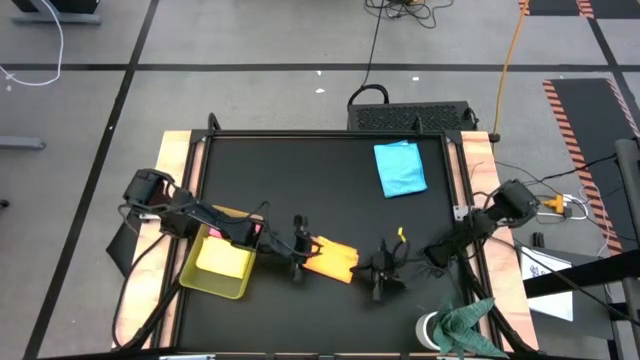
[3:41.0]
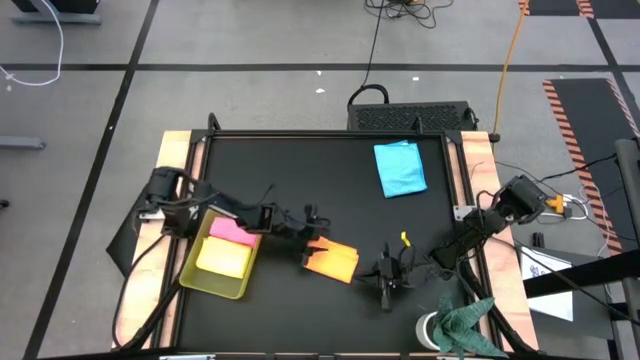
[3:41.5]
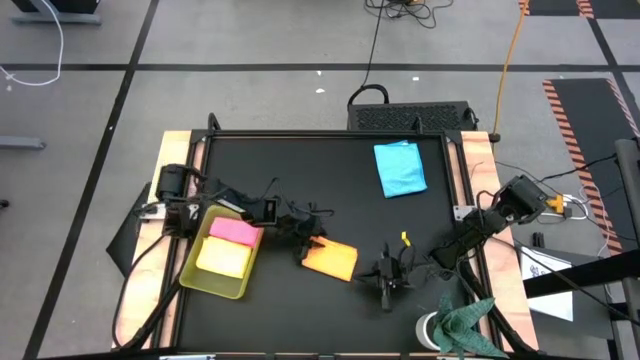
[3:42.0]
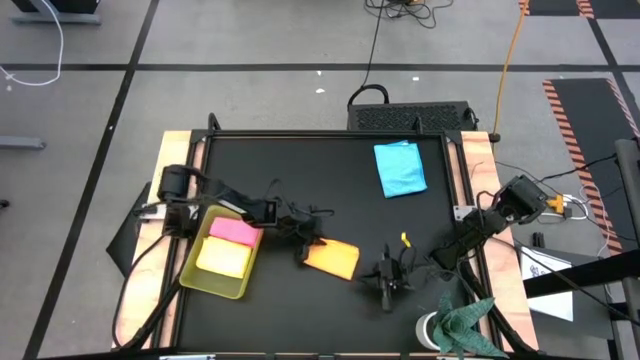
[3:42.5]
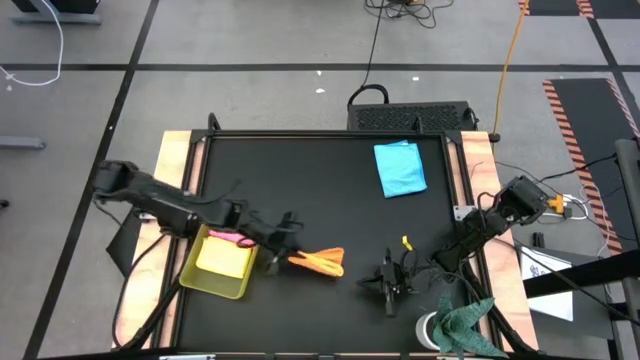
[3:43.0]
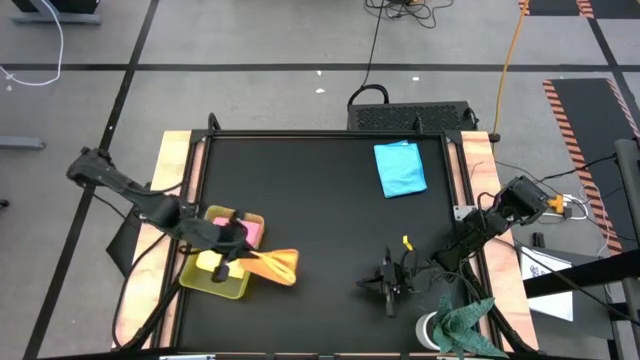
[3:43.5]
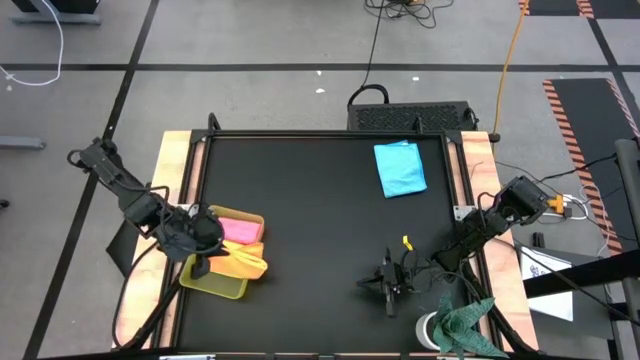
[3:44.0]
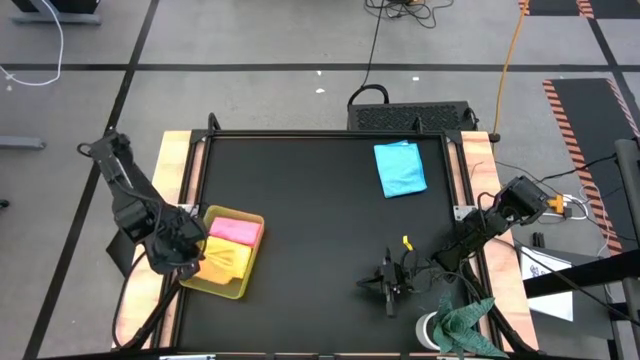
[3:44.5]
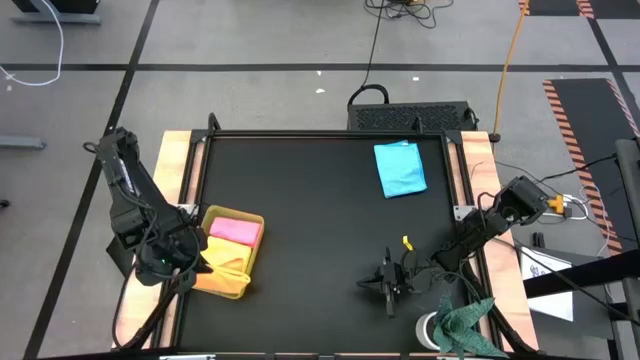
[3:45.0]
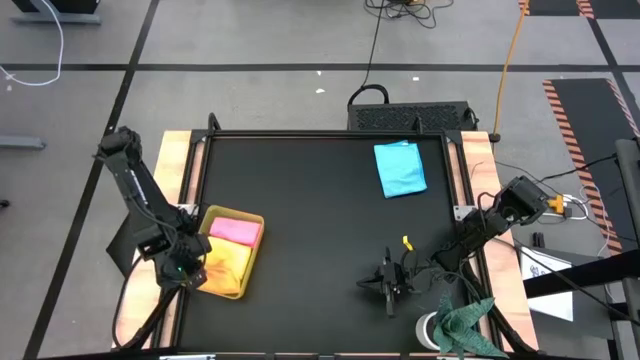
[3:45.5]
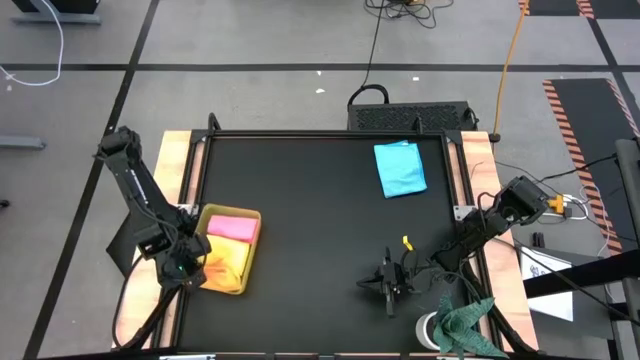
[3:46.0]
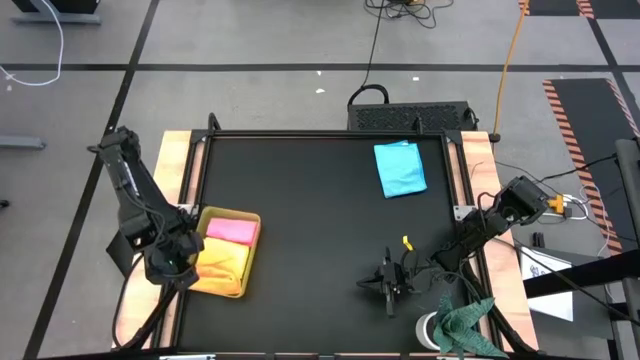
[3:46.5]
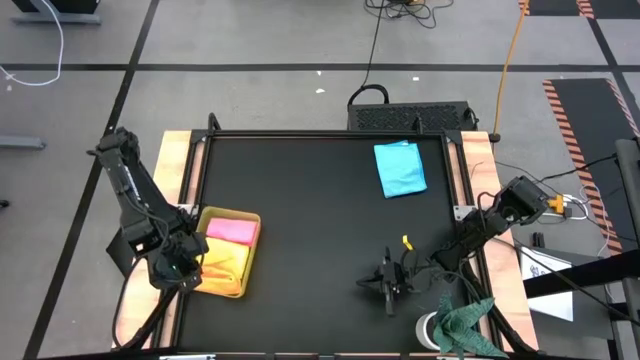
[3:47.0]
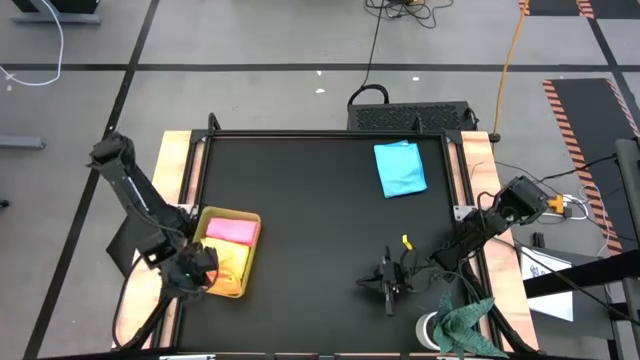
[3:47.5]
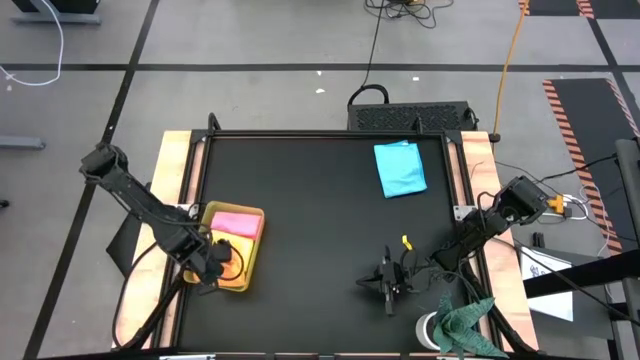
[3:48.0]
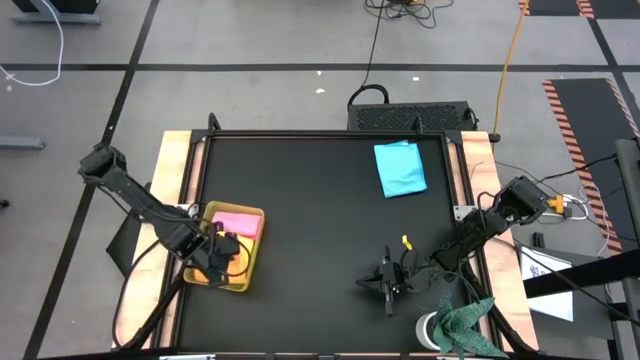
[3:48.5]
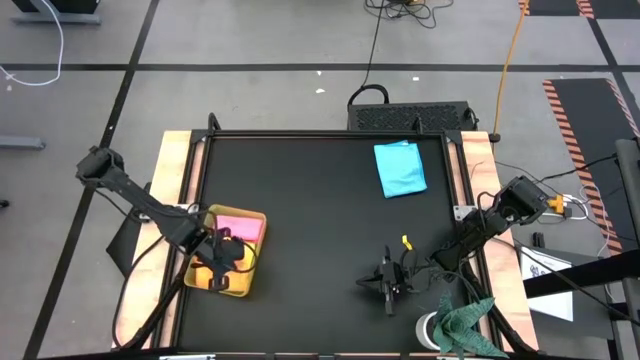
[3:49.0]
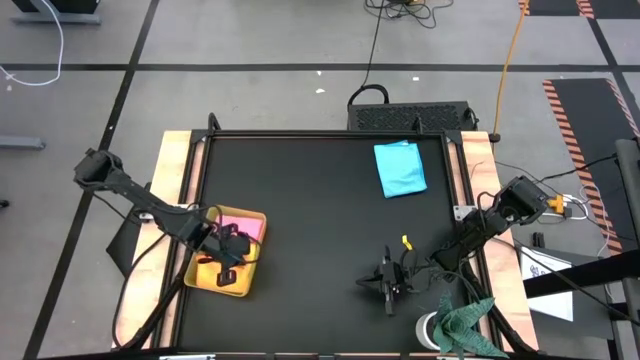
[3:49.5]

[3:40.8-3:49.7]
Task: Fold microfiber towels
Put the orange microfiber towel into the yellow bin

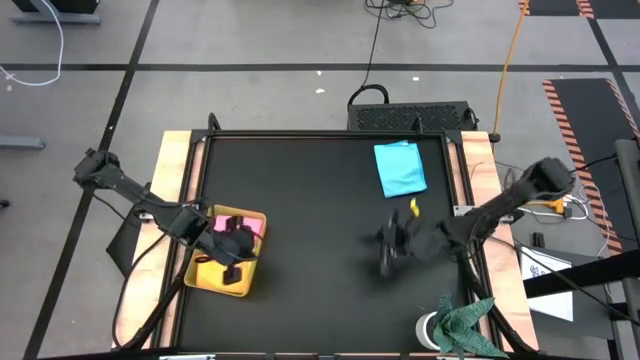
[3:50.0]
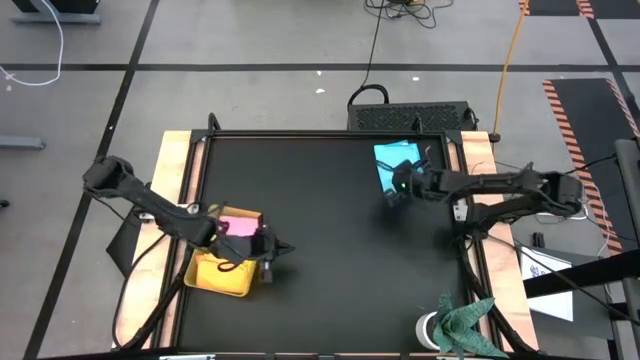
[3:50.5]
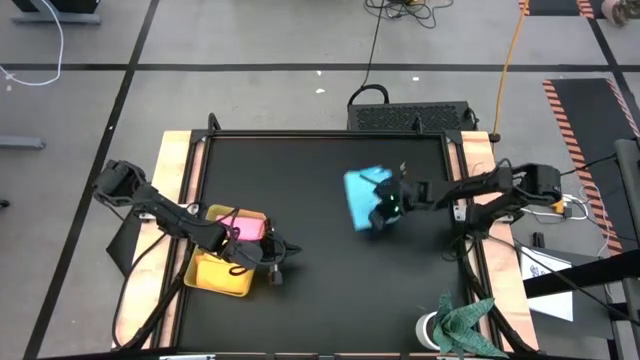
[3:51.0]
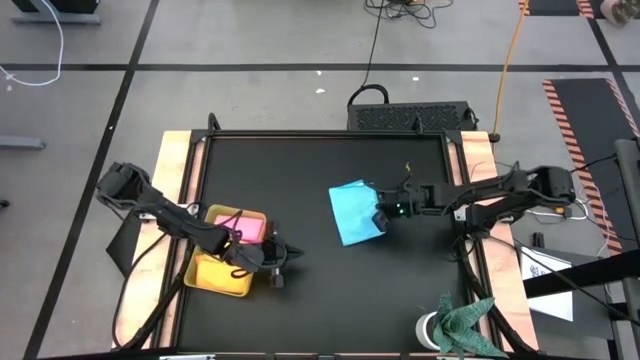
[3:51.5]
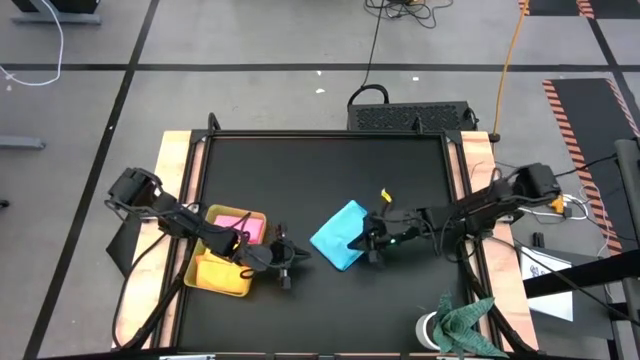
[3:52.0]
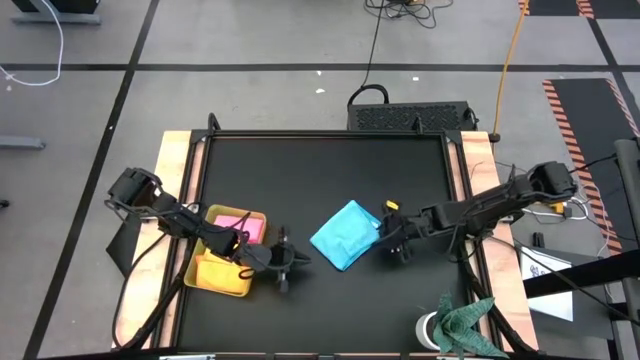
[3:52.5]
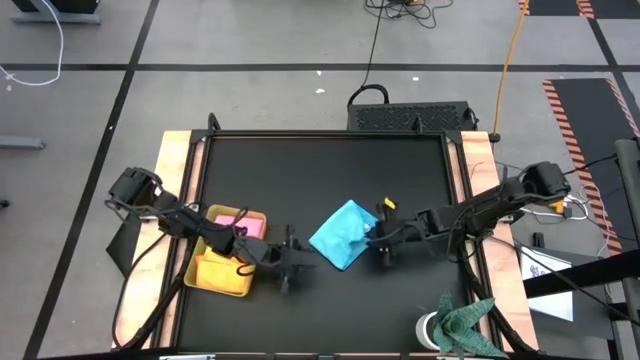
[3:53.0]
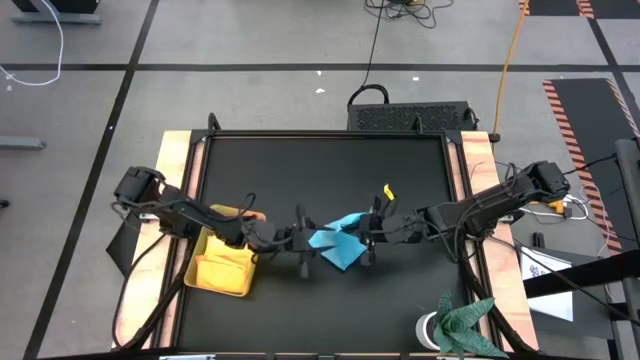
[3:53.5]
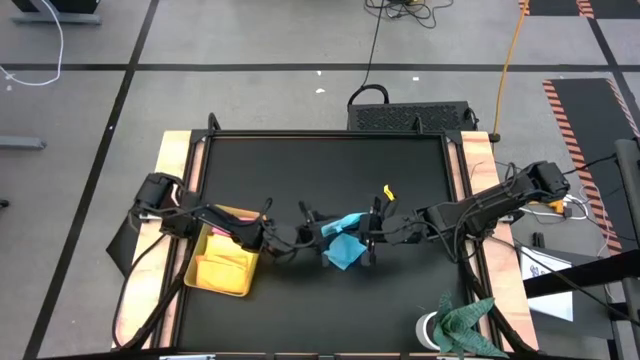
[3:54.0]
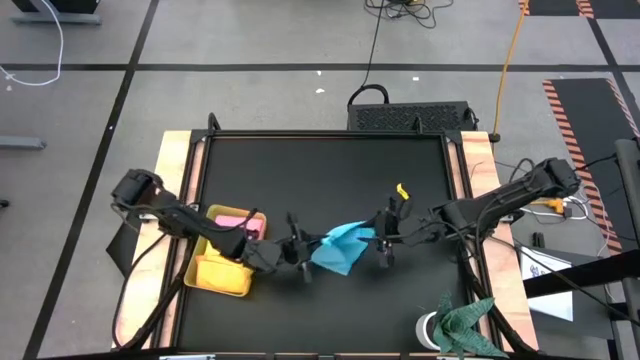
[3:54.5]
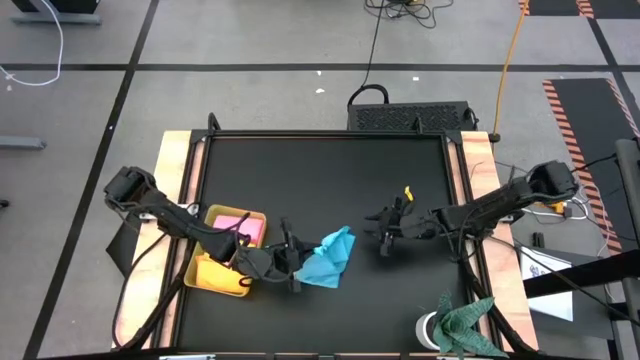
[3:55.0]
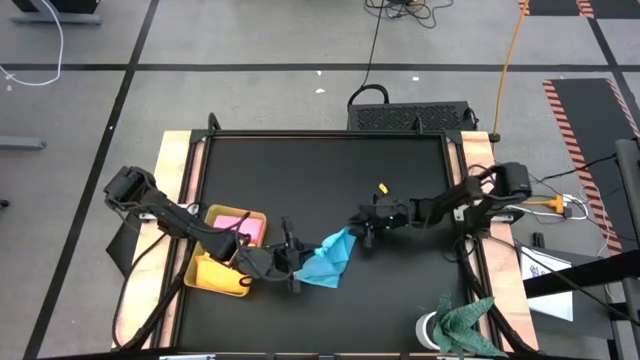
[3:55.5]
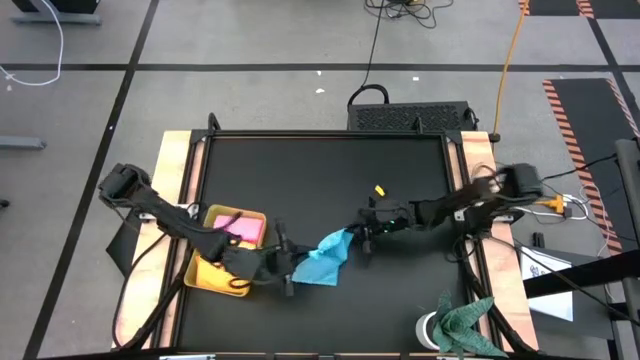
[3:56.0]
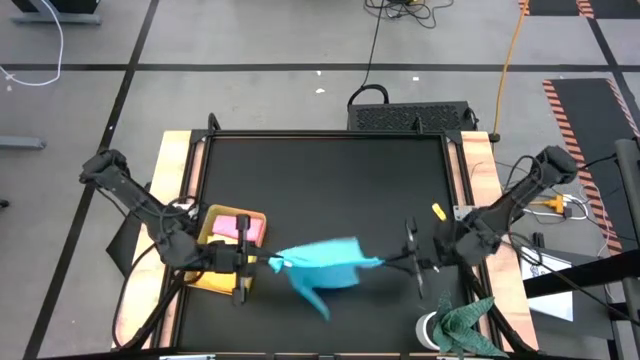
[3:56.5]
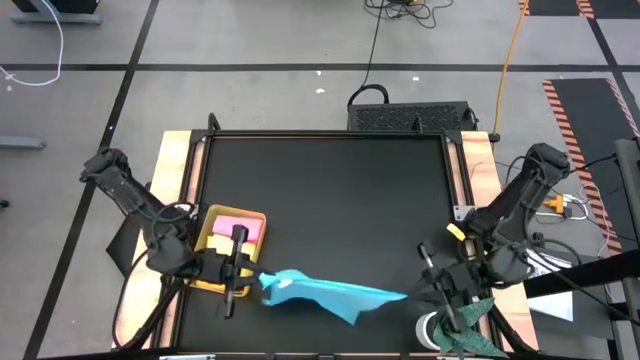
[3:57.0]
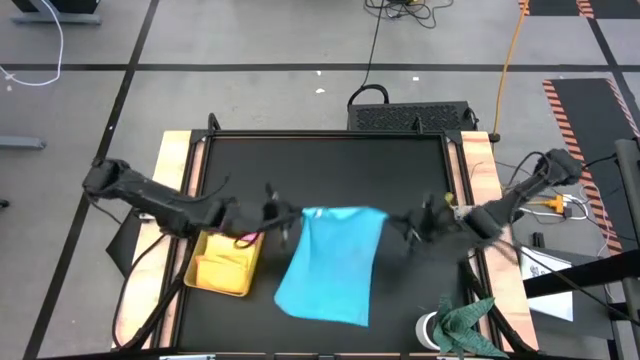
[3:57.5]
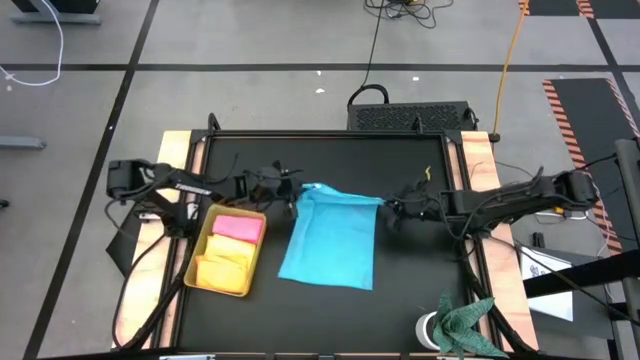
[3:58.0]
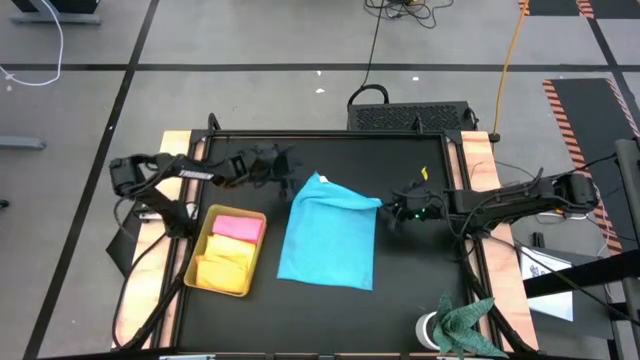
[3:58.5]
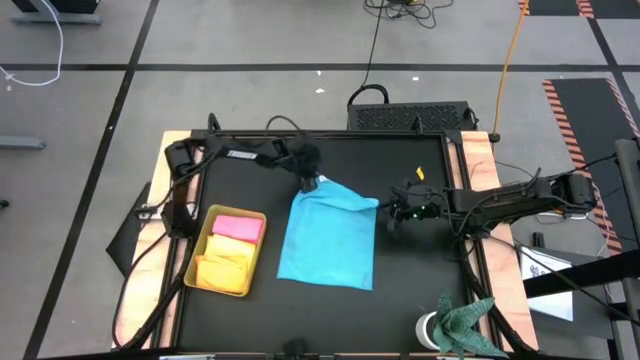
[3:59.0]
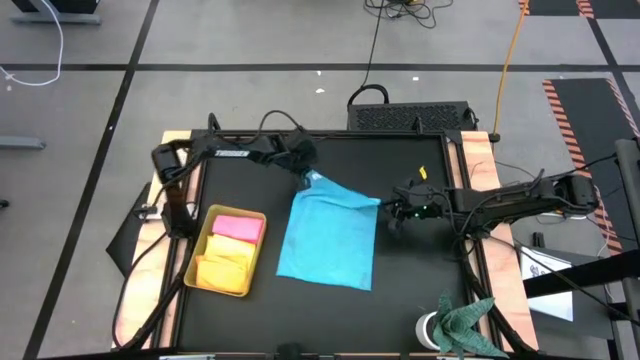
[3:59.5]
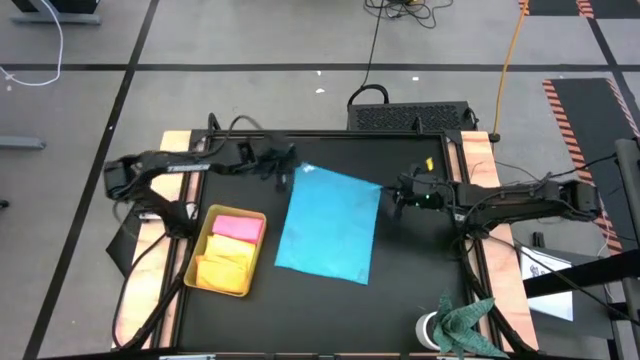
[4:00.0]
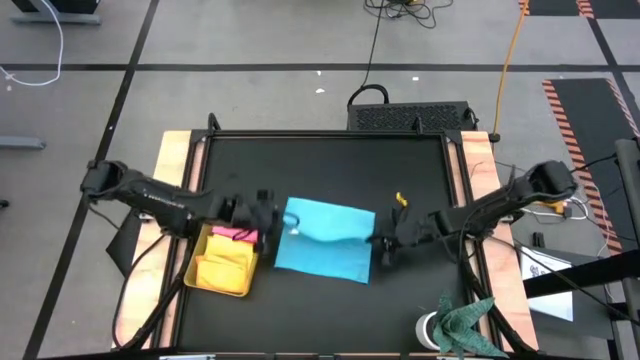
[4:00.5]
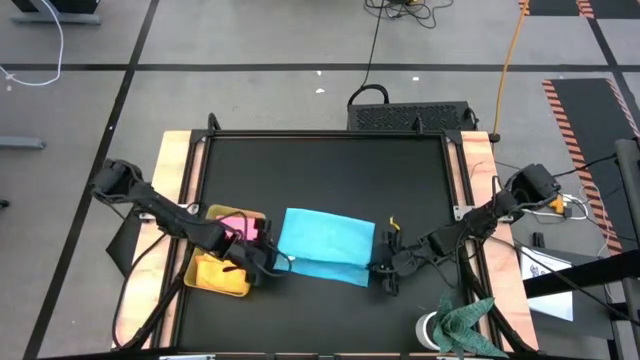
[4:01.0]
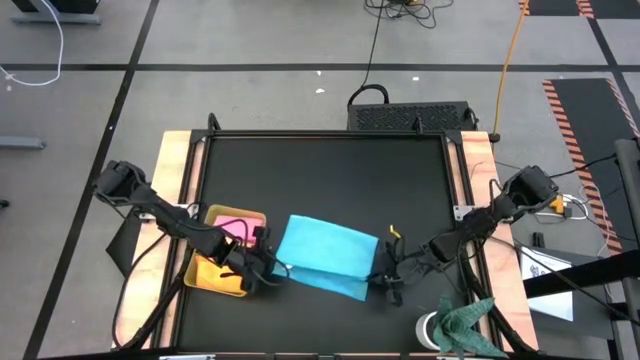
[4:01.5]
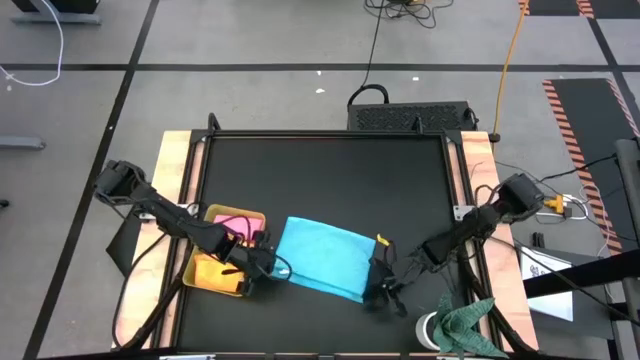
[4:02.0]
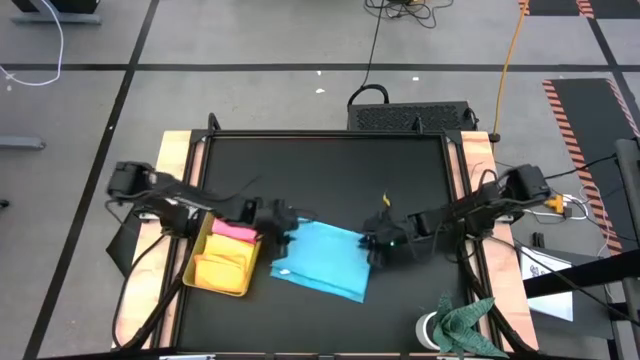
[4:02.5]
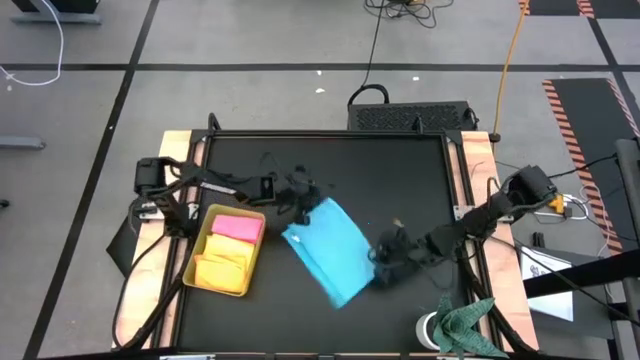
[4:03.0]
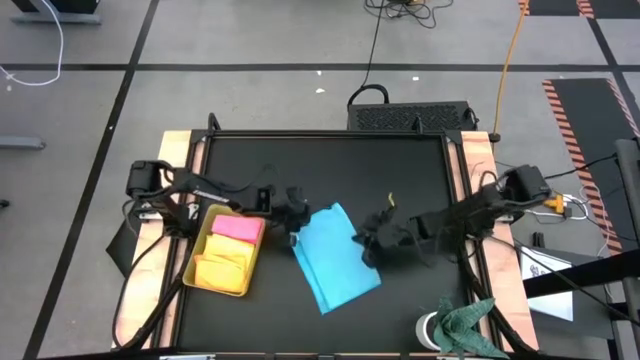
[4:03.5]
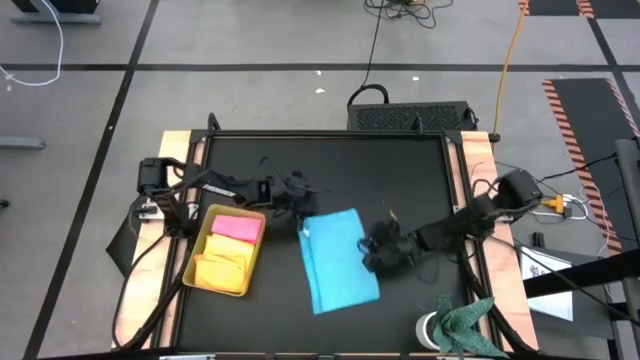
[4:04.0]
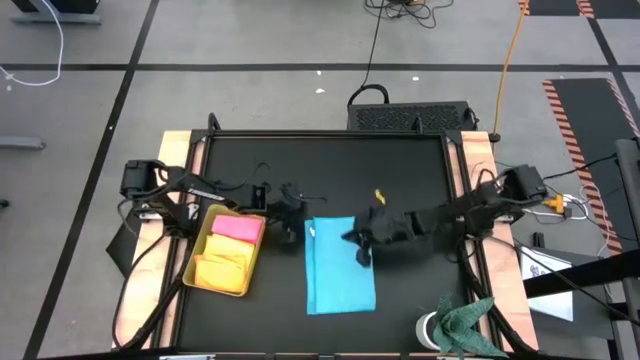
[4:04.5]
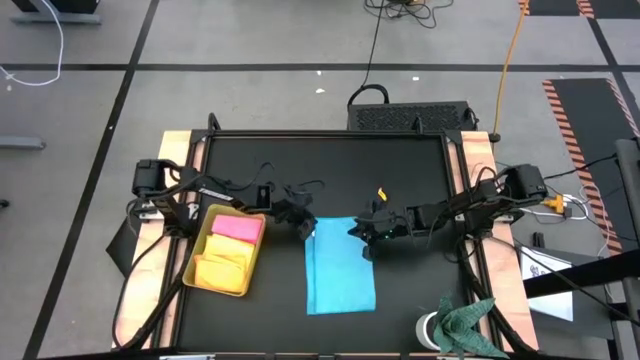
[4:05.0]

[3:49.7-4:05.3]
Fold the blue microfiber towel
